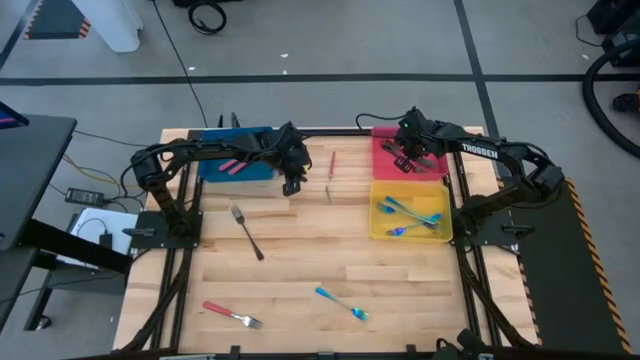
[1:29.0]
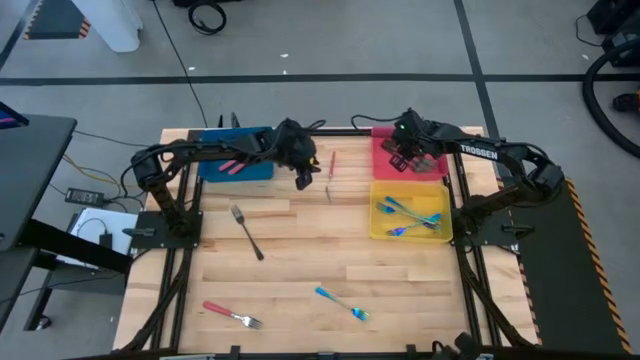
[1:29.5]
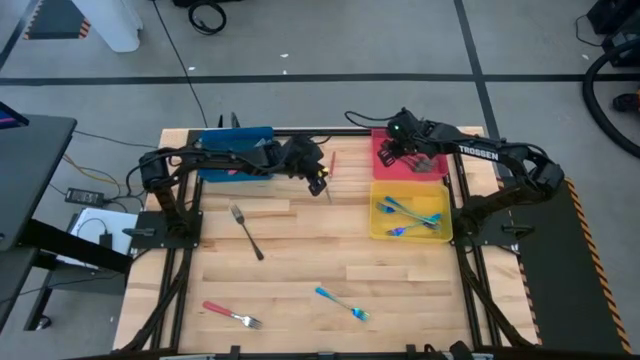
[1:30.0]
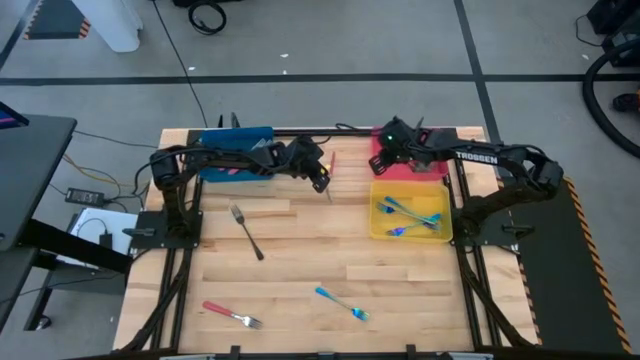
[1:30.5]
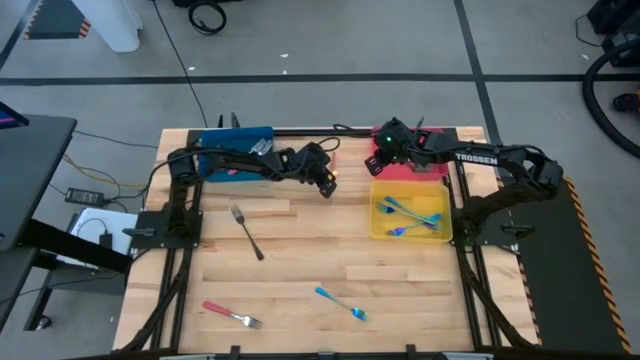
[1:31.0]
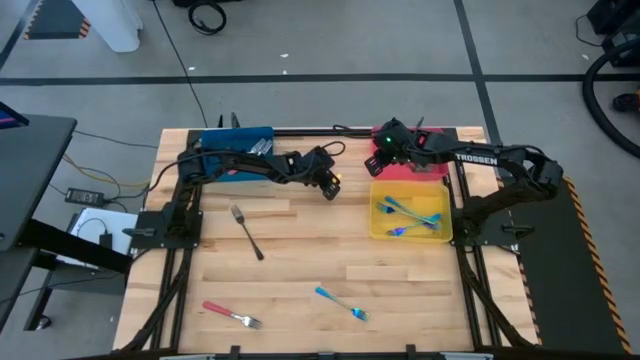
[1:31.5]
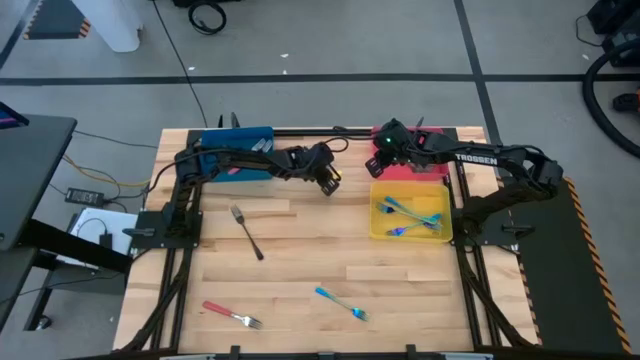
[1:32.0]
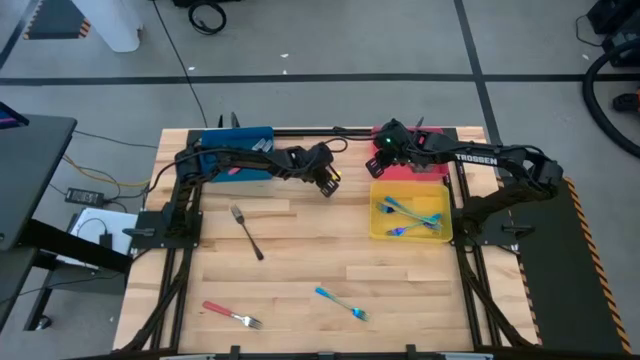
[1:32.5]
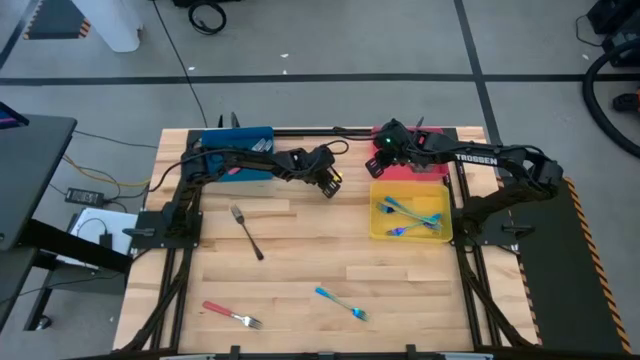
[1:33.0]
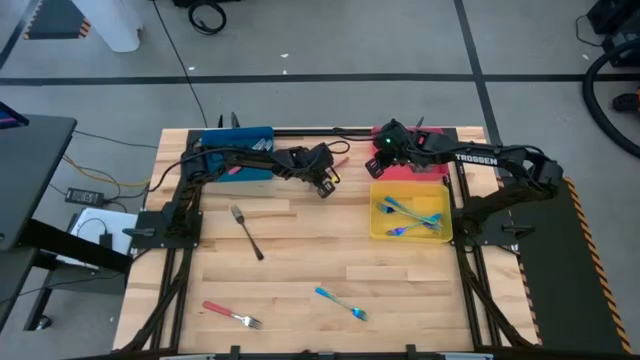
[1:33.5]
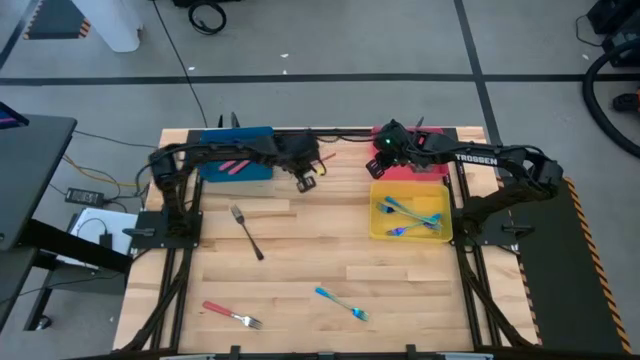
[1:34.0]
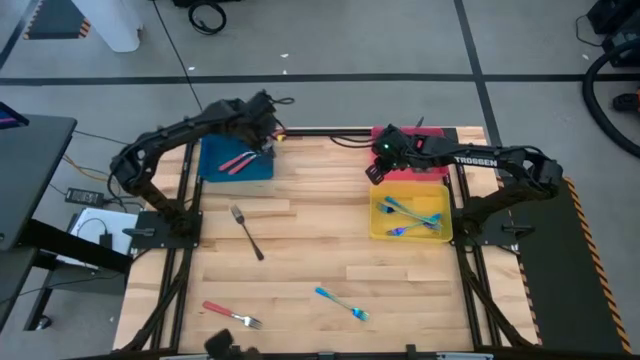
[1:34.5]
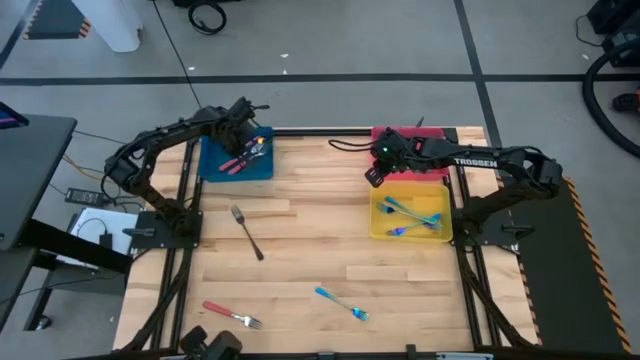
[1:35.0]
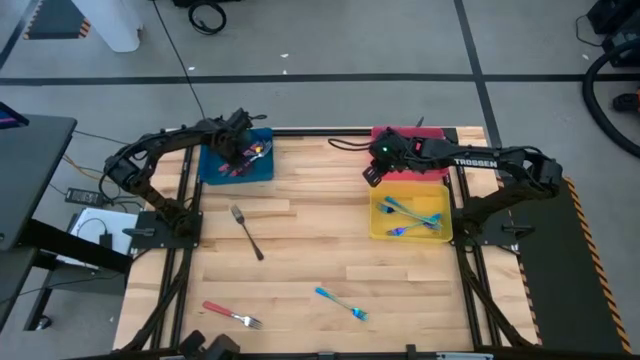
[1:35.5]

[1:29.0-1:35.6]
Task: Sort silverware by color (type)
Put the top pink fork into the blue bin

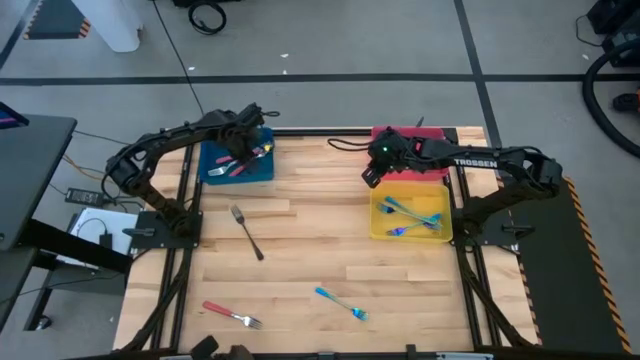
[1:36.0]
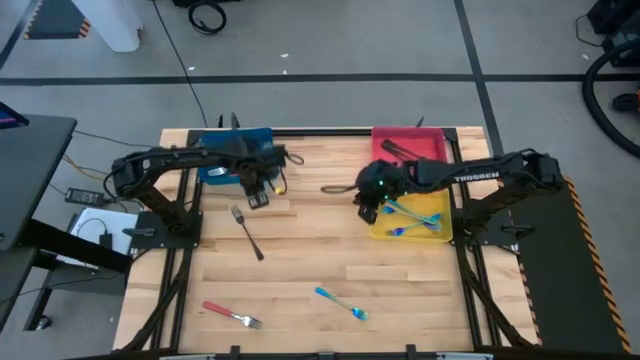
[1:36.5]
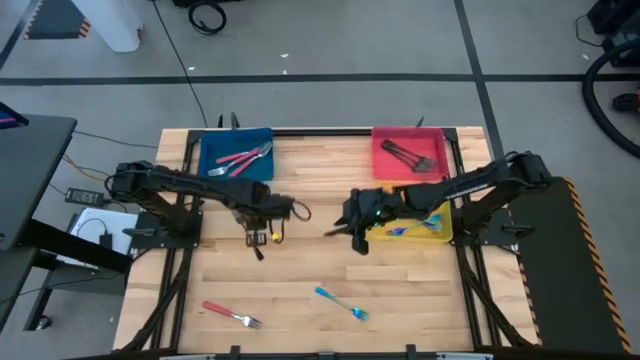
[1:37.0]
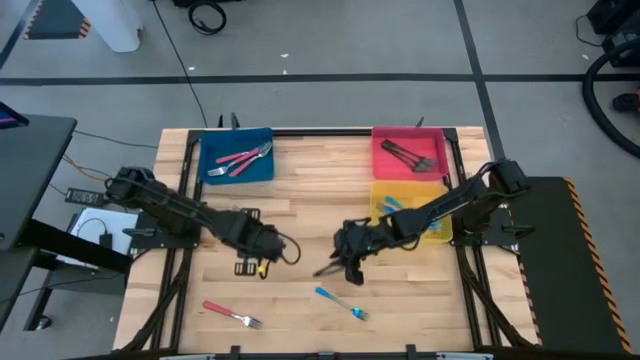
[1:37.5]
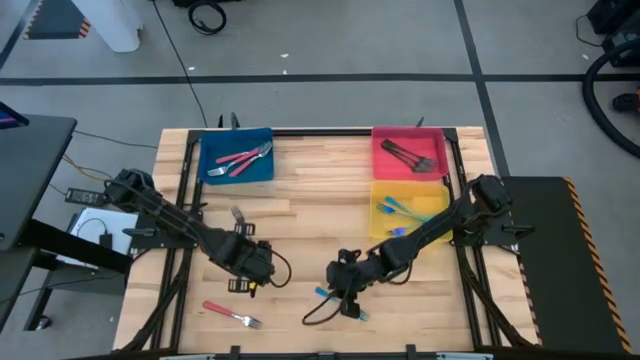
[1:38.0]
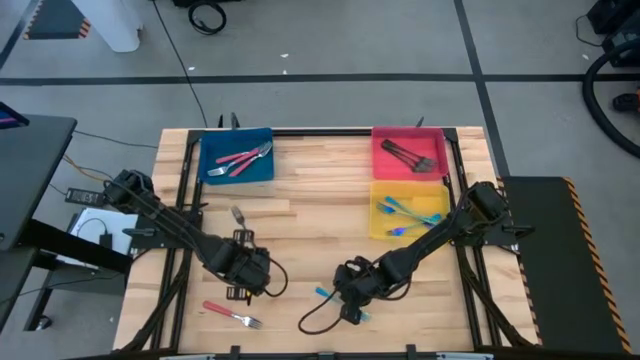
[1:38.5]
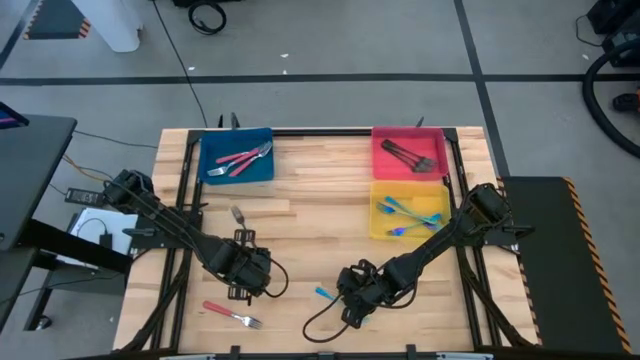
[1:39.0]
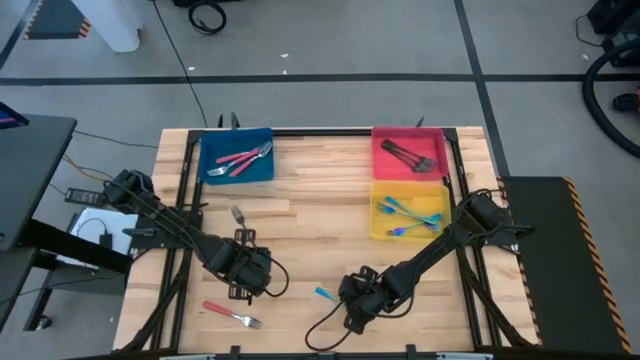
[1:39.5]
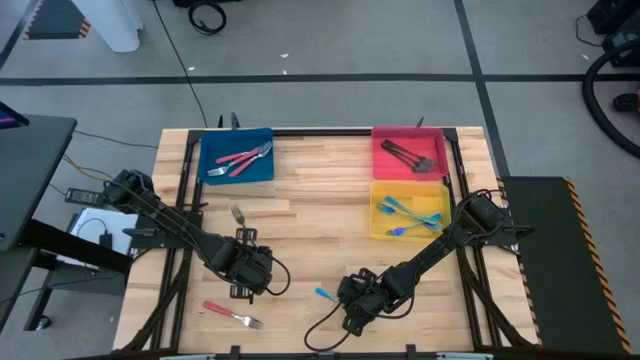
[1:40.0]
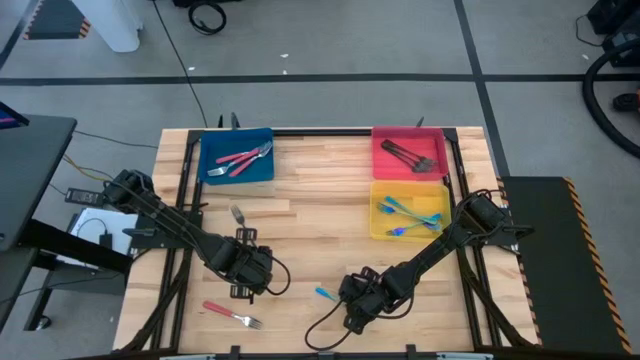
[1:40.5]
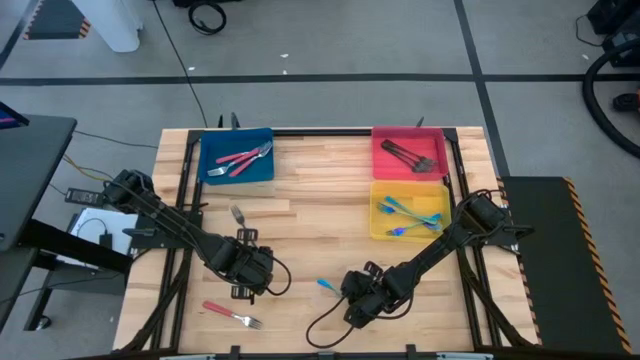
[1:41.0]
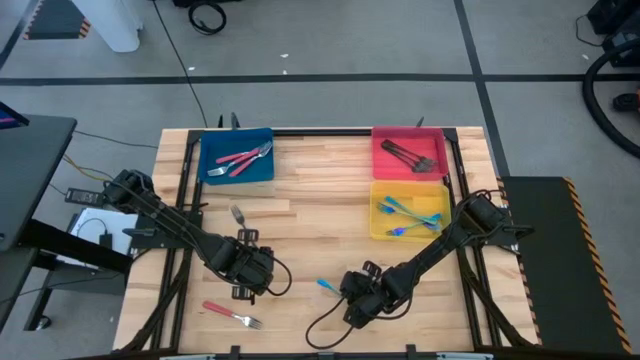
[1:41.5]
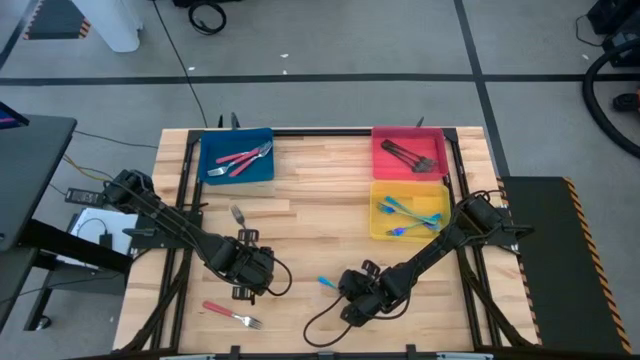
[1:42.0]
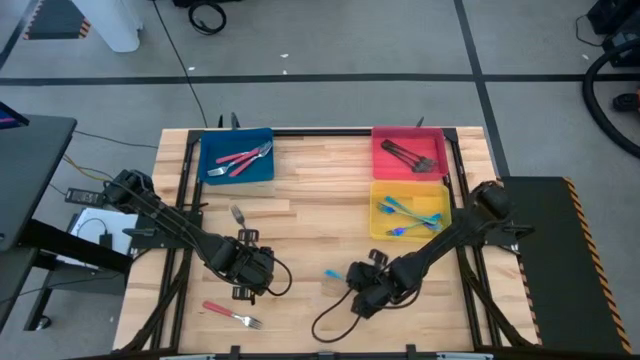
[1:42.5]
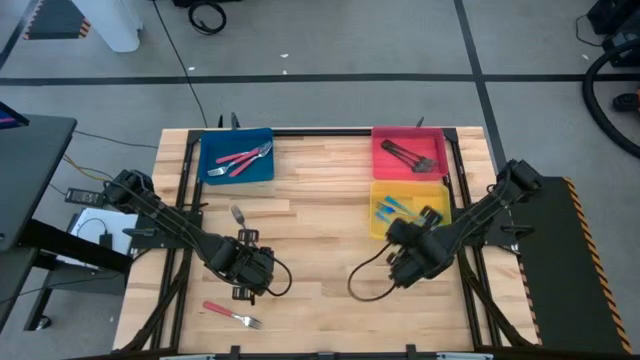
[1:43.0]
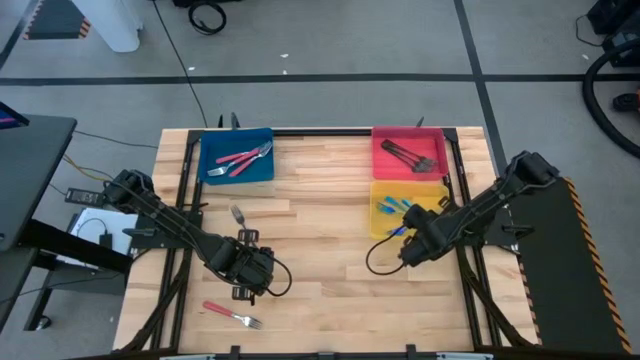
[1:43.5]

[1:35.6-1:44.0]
Put the blue fork into the yellow bin

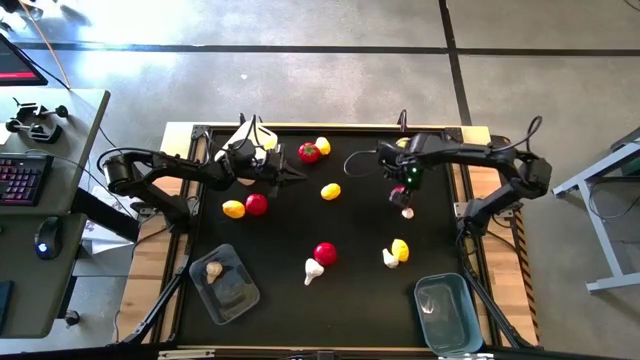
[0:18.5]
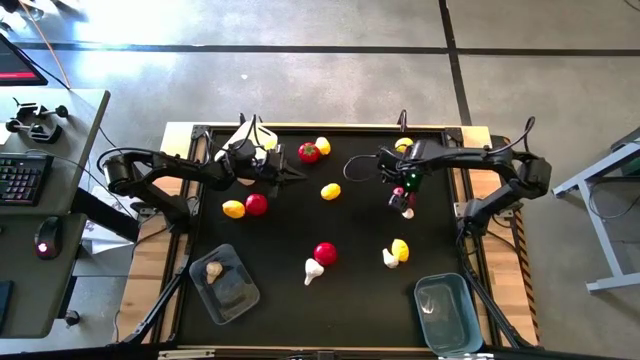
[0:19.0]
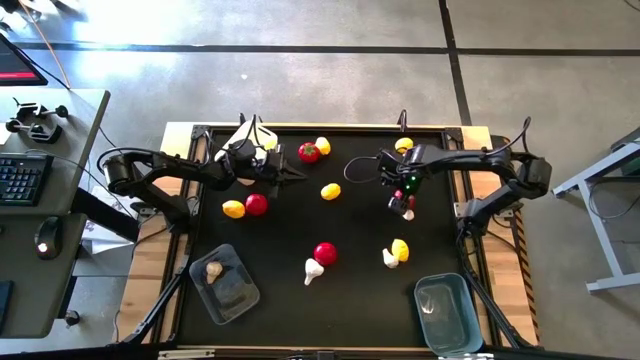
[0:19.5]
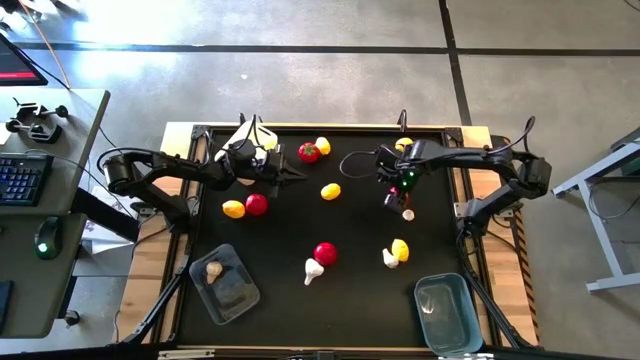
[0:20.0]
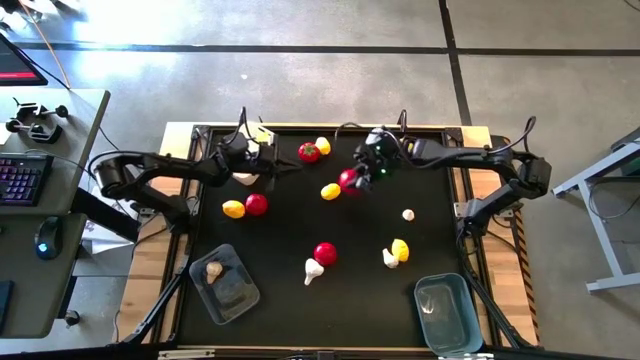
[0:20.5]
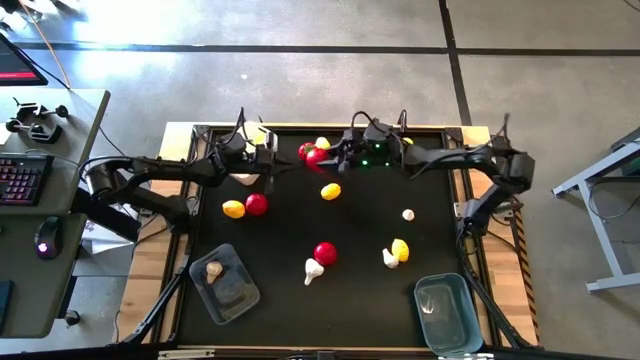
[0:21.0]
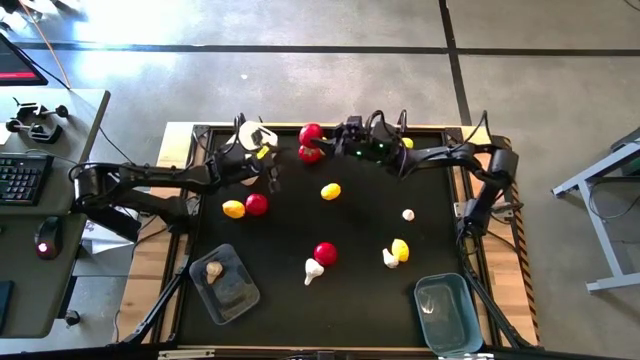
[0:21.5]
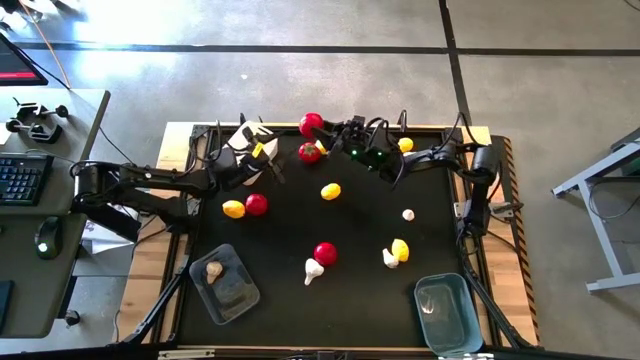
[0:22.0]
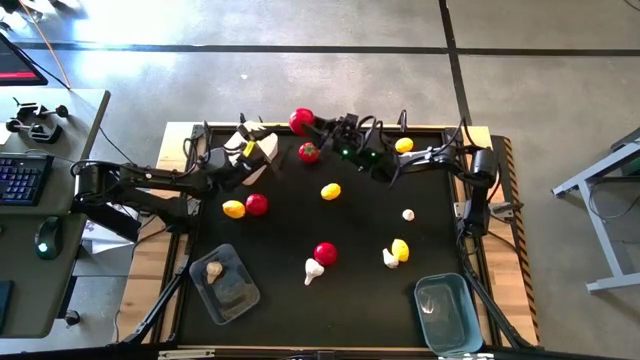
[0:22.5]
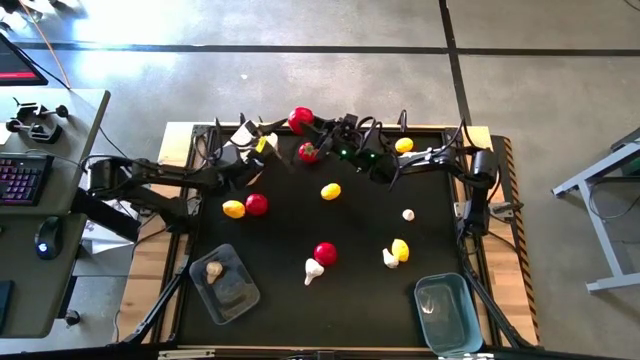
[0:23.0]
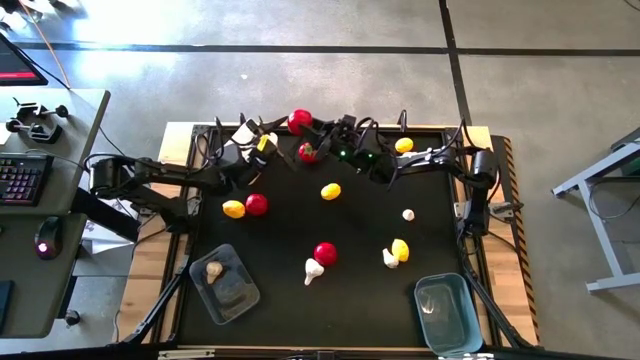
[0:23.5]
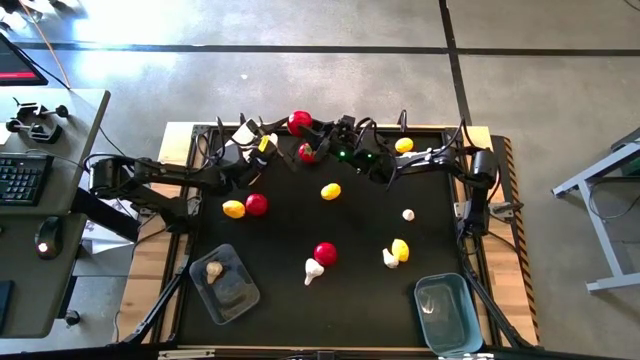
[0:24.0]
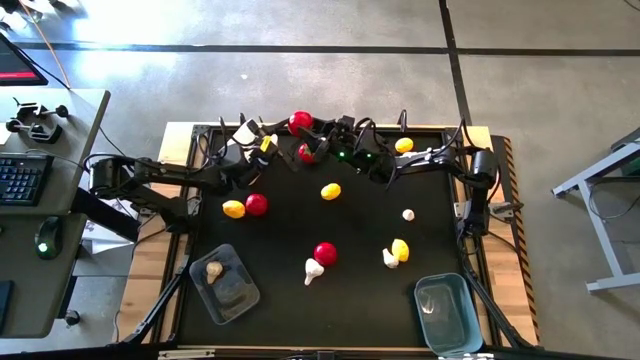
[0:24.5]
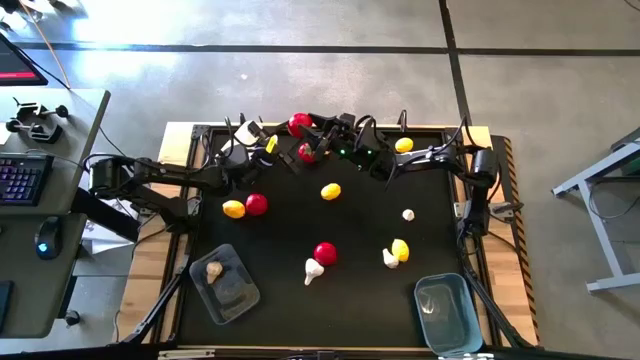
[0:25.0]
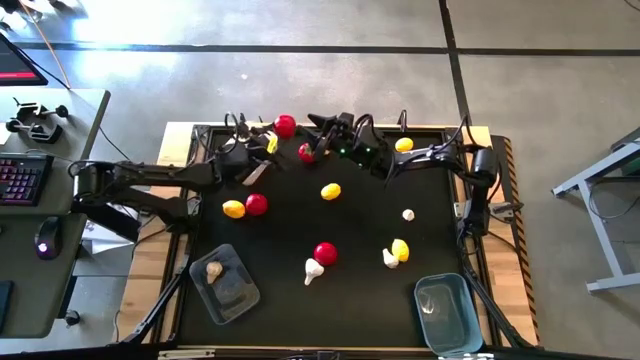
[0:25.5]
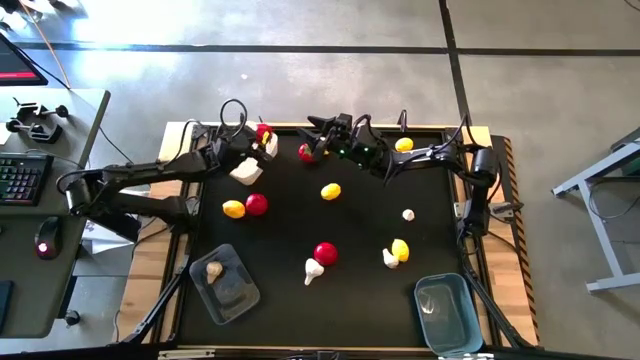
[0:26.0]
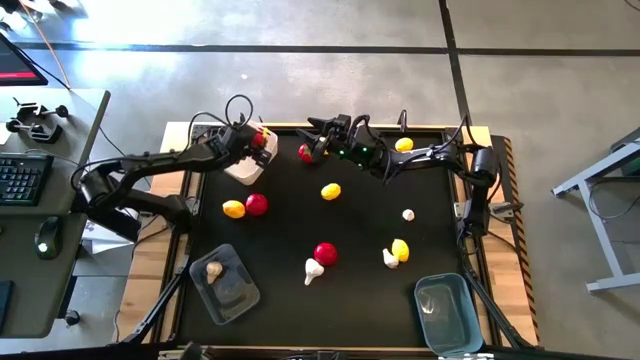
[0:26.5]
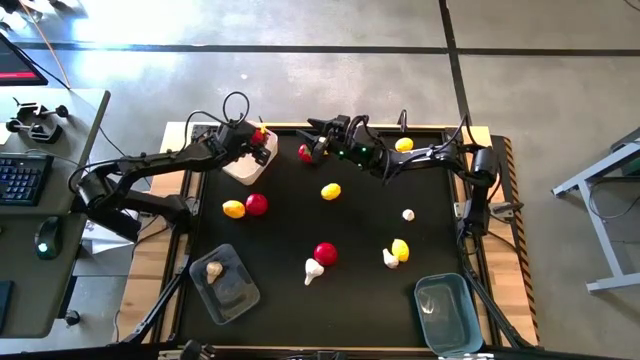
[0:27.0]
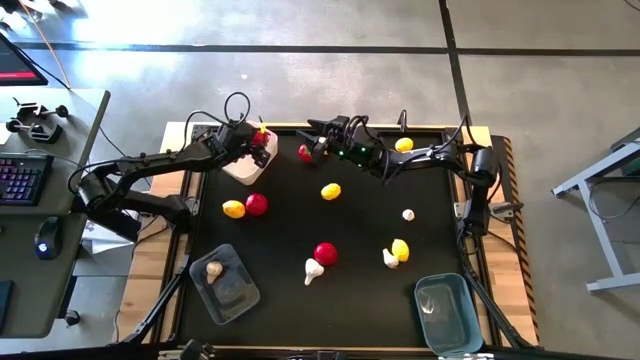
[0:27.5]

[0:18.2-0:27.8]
Task: Sort produce into baskets
Put the red tomato into the white bin
